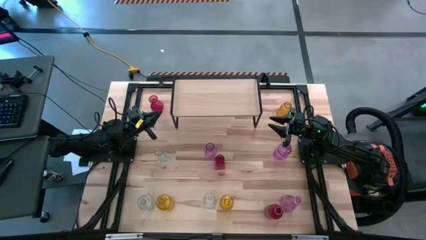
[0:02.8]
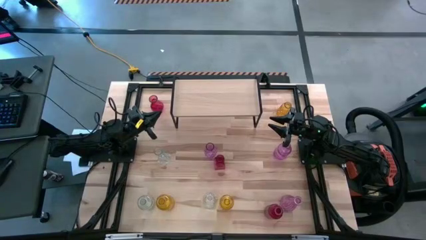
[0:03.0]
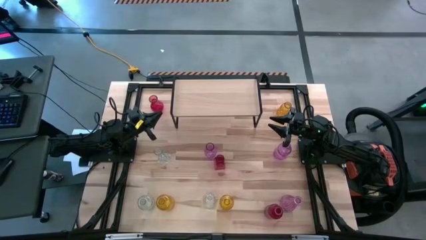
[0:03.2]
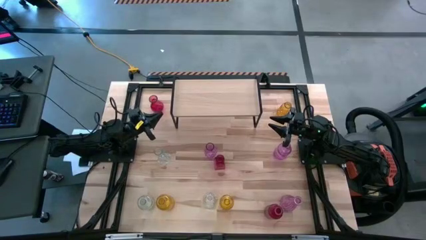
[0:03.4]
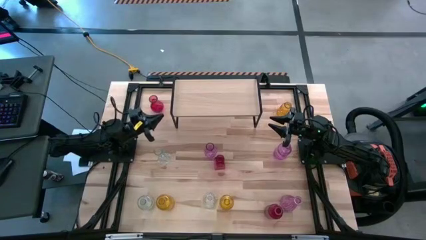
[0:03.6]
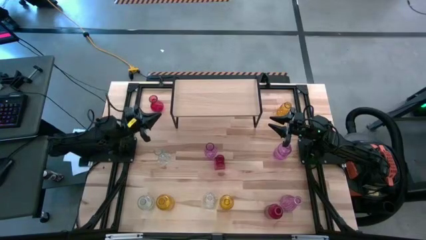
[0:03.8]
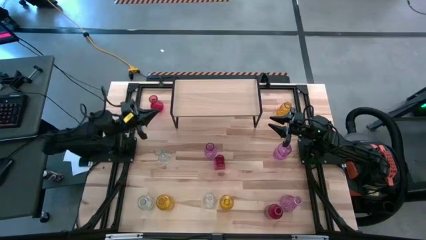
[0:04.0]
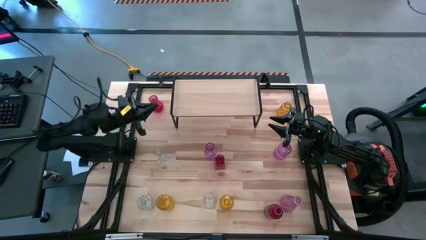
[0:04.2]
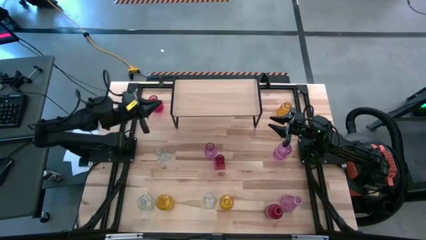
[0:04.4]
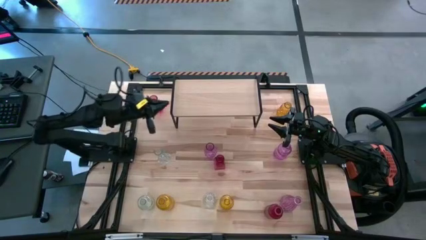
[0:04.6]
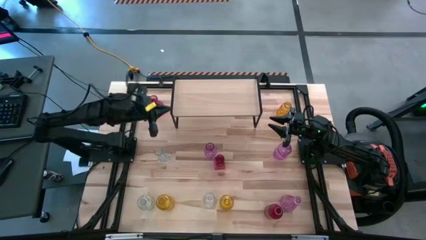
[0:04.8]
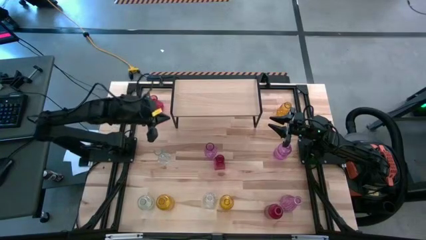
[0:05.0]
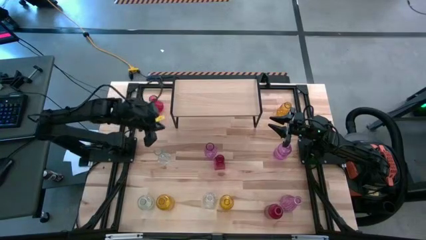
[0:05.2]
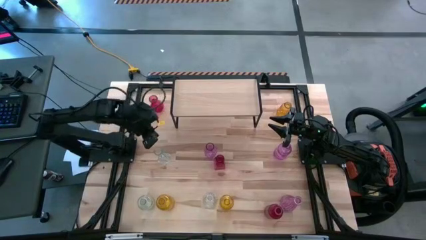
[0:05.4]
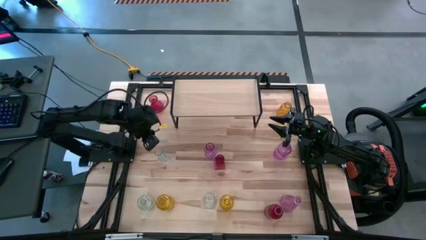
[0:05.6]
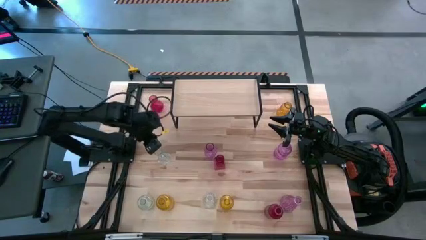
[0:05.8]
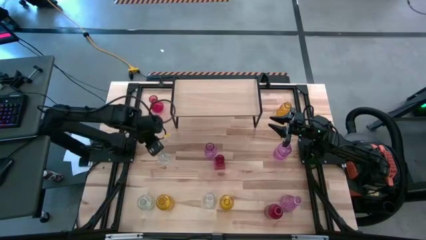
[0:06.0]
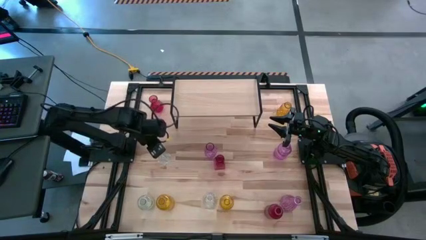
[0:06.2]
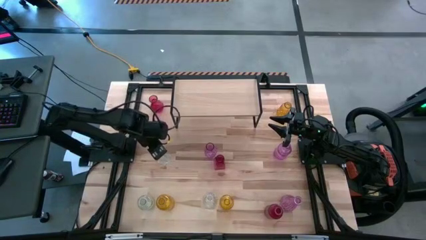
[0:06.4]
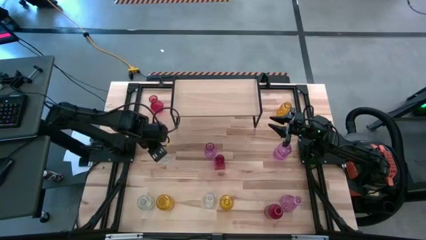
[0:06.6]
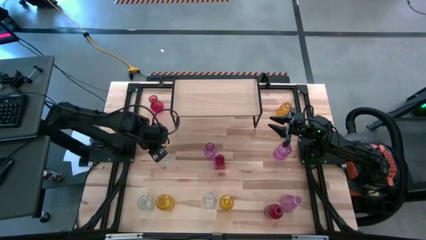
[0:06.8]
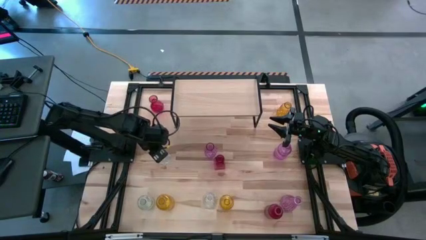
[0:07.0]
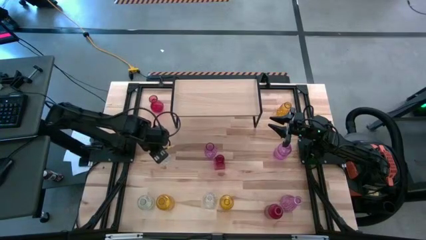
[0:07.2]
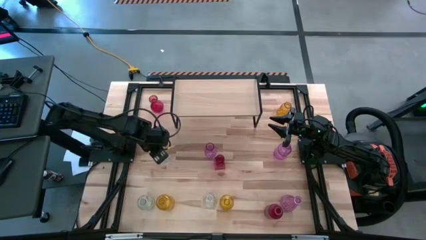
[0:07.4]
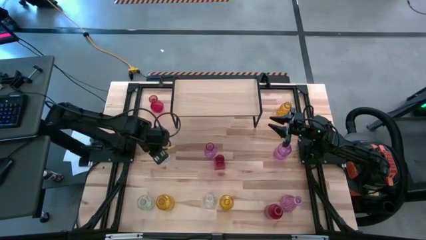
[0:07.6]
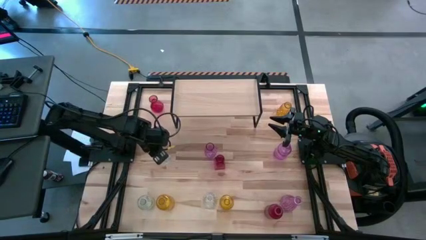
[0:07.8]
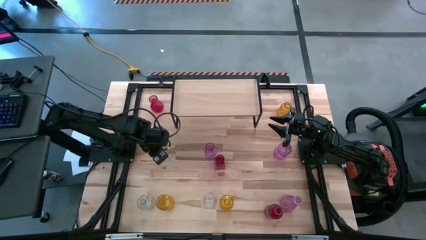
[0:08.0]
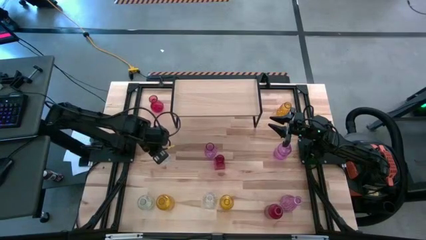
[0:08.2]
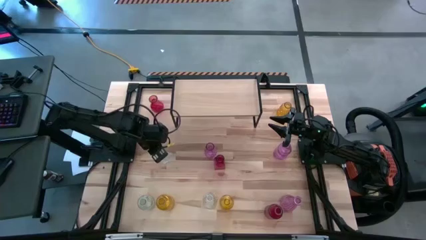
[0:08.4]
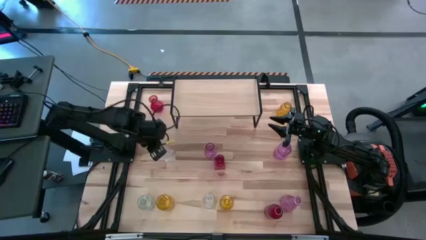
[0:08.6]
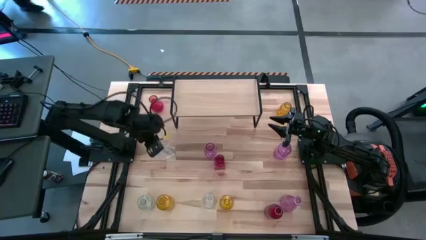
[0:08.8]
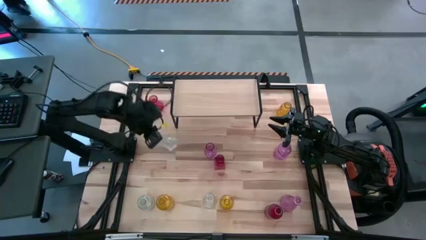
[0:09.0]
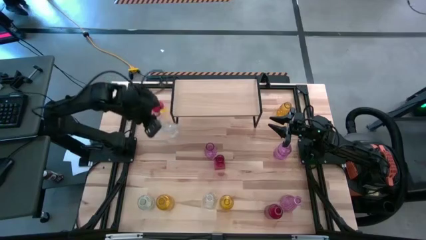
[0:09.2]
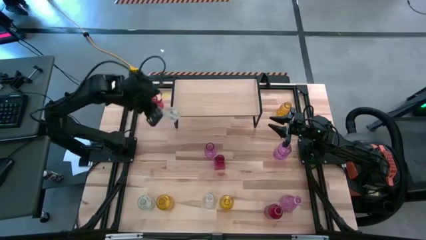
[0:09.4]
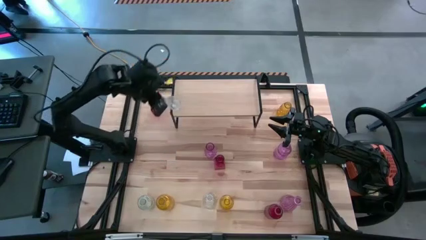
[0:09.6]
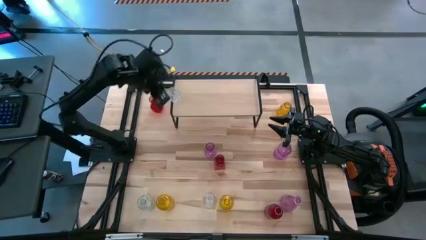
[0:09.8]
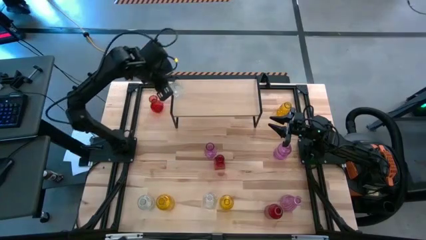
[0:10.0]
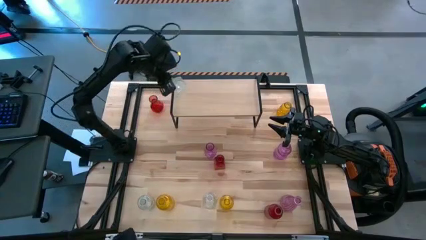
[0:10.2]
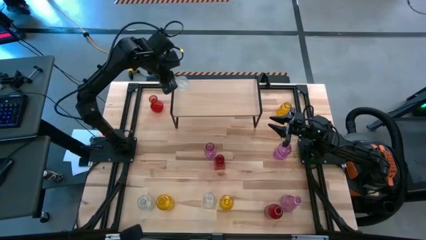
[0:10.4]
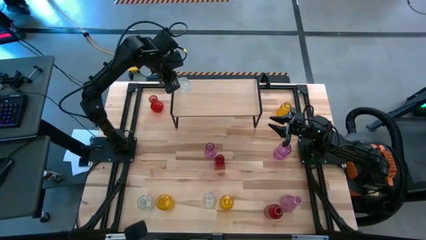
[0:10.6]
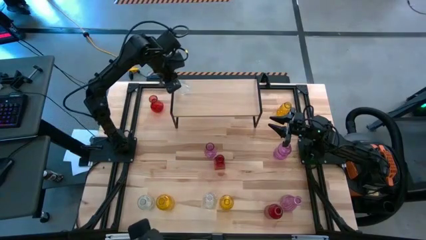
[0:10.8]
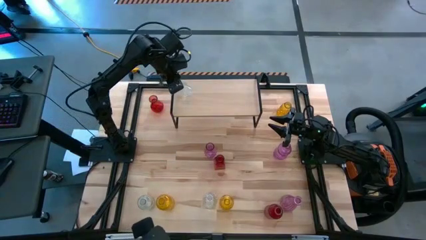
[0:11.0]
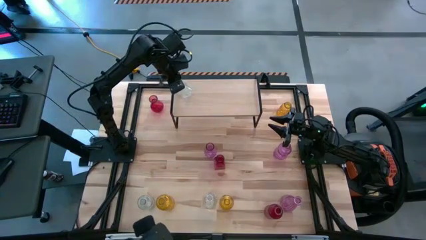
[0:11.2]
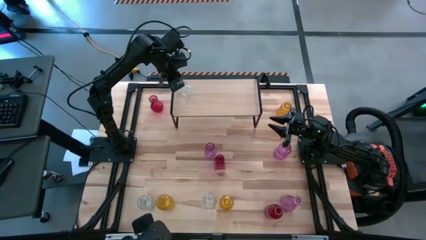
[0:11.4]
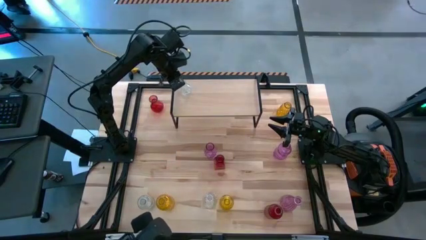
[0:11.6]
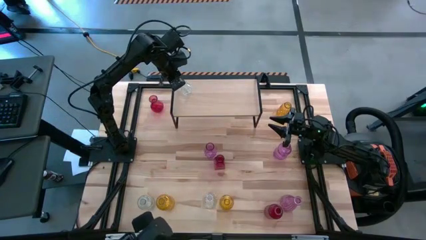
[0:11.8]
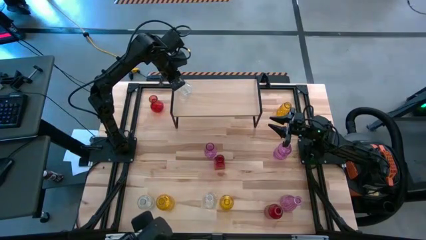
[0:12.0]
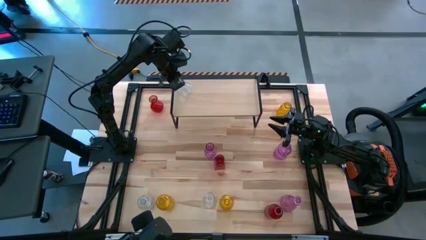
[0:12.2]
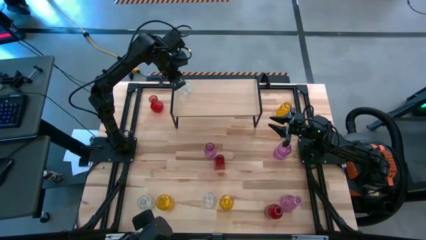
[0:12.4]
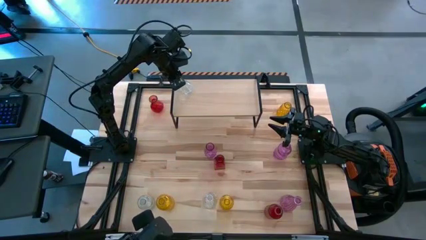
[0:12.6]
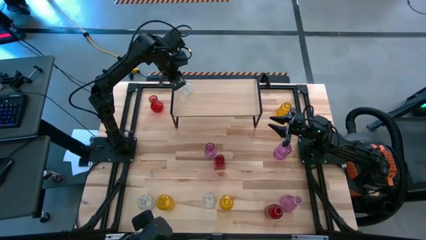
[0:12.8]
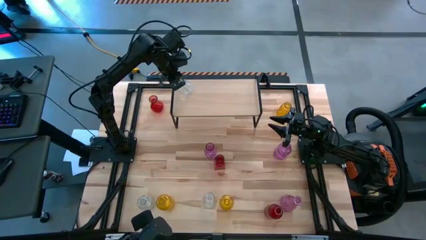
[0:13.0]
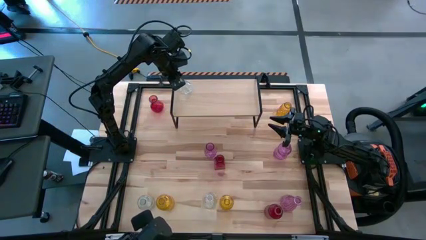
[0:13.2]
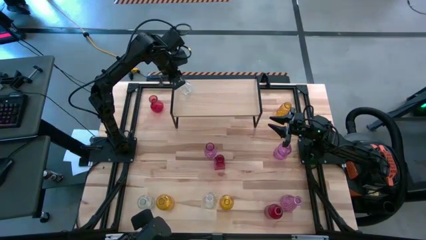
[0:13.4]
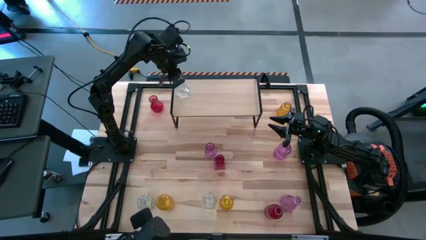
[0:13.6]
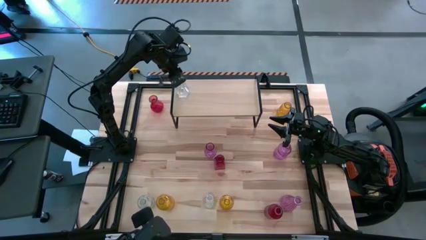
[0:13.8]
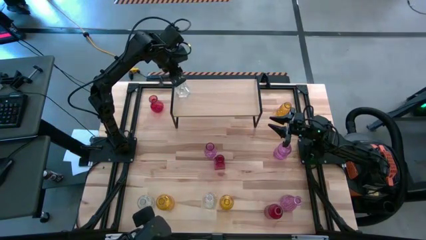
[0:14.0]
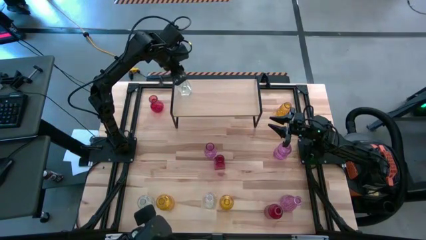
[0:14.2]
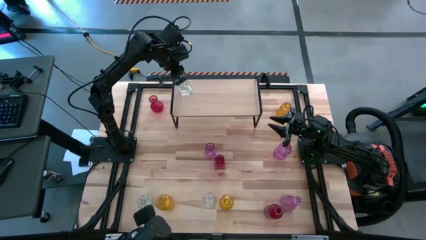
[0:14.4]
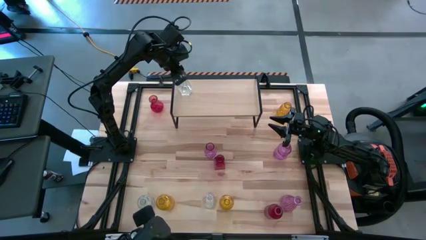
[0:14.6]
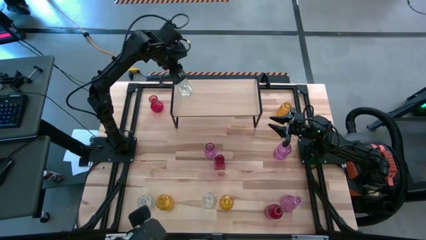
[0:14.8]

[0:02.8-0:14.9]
Task: sort vases onto shelf
Put the top transparent vase on the shelf

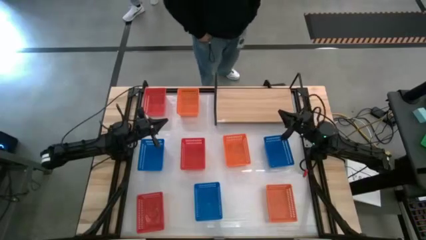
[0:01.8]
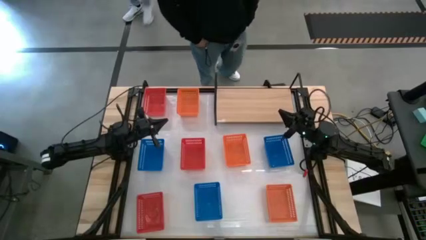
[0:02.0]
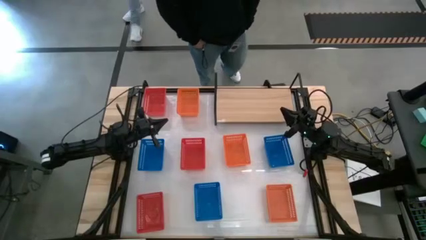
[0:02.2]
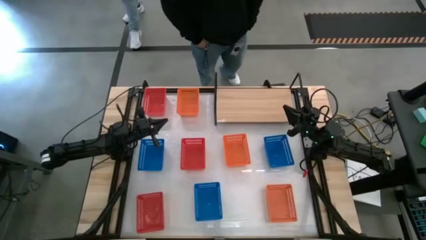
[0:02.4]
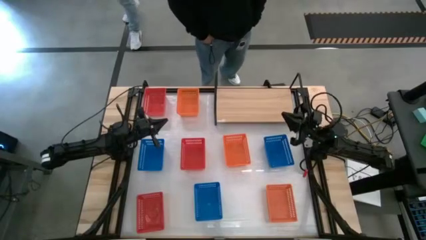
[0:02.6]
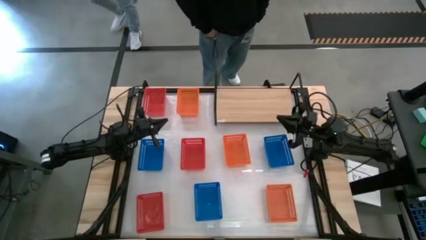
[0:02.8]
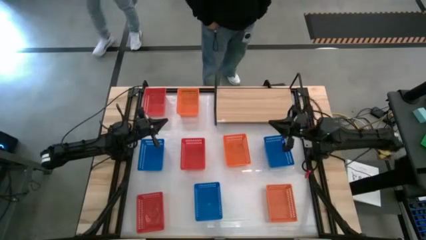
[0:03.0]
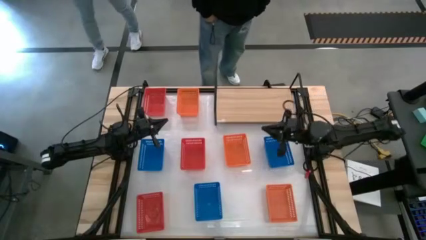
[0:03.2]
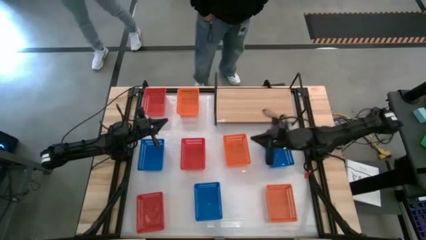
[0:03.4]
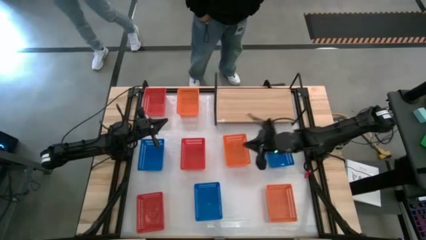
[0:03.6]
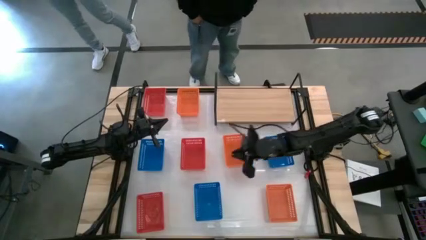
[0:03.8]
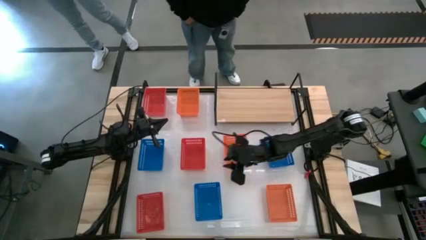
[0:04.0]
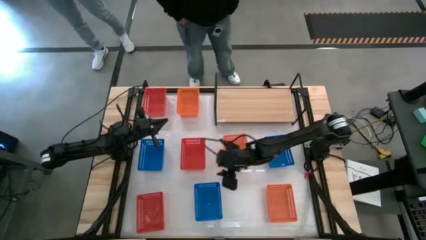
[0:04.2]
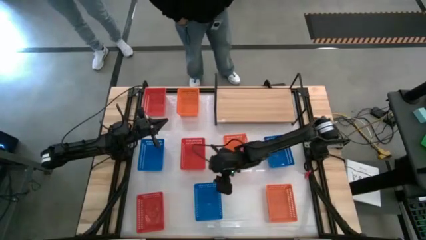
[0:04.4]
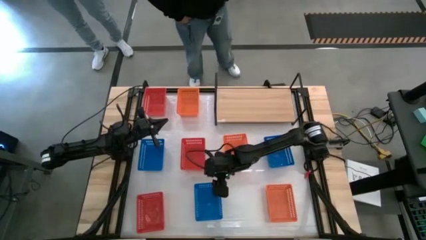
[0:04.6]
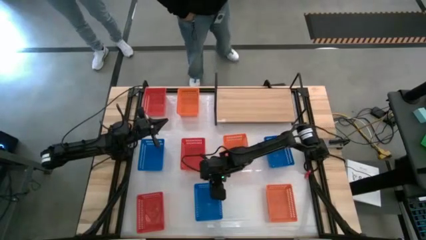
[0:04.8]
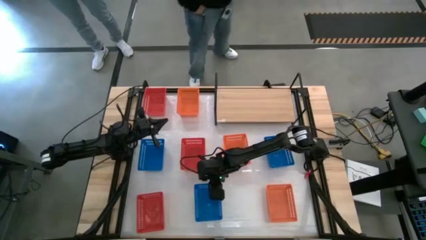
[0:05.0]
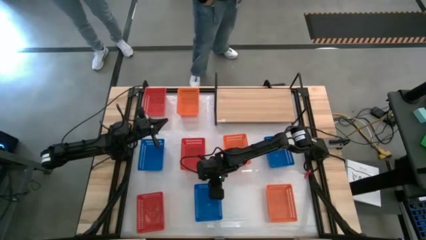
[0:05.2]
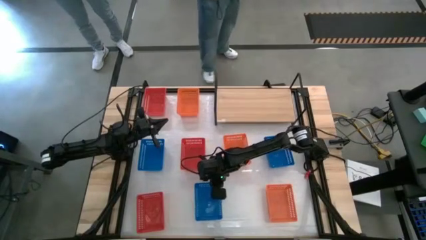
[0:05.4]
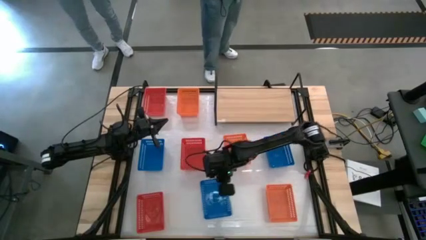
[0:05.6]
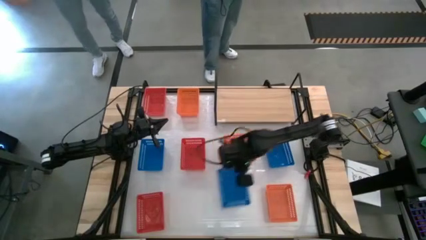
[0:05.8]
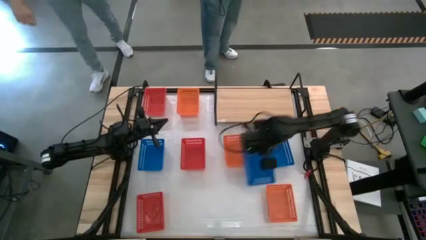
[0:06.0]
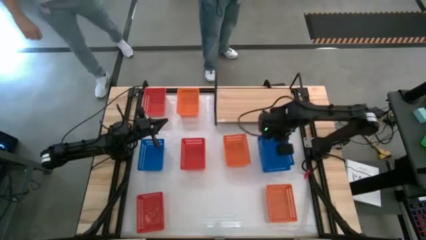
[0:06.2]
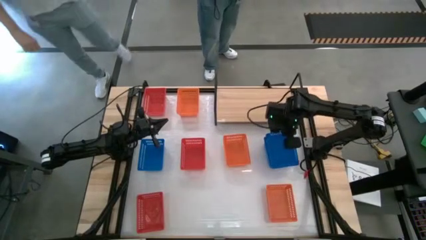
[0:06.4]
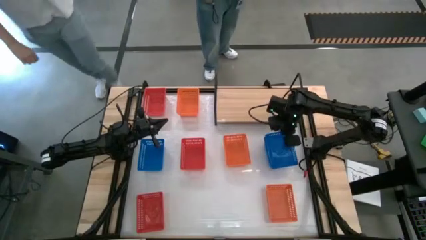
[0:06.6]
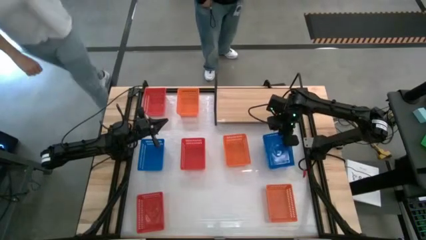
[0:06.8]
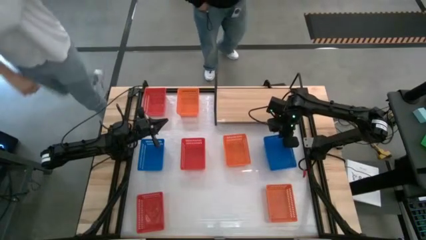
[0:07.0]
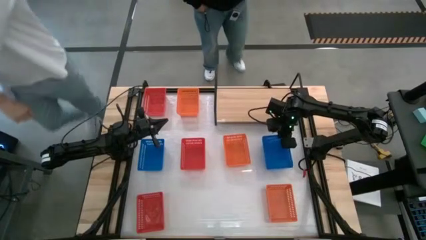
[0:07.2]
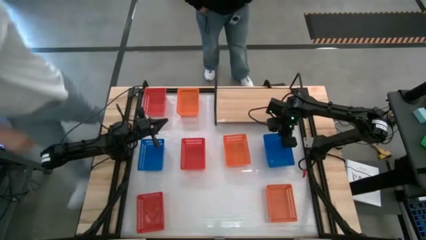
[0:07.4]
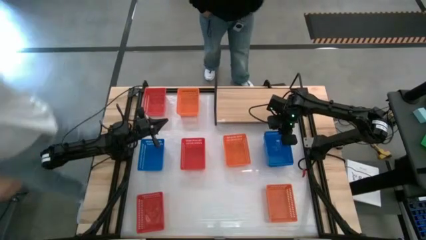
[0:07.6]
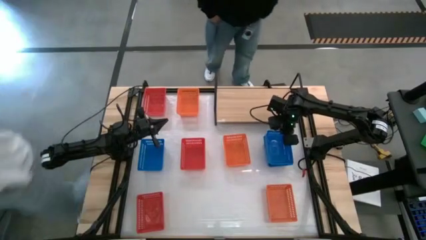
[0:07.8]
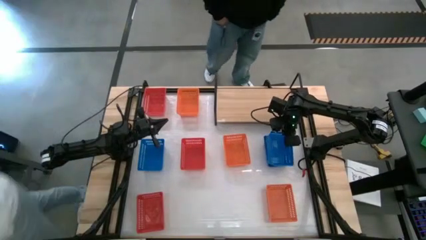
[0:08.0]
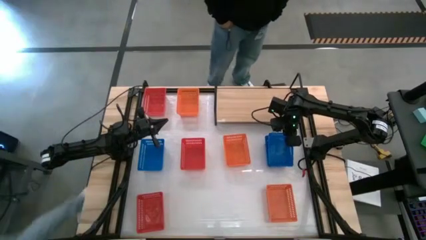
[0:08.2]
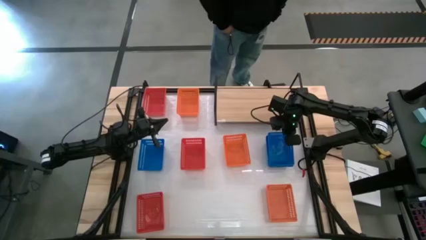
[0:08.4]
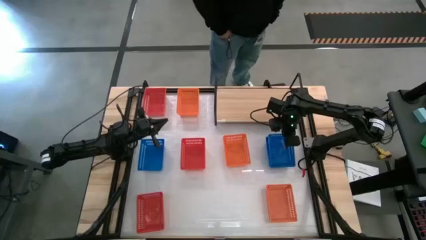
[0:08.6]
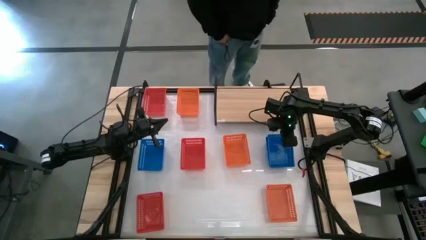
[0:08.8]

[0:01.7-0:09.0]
Task: Stack baskets on shelf by color
Stack the bottom blue basket on top of the top right blue basket
